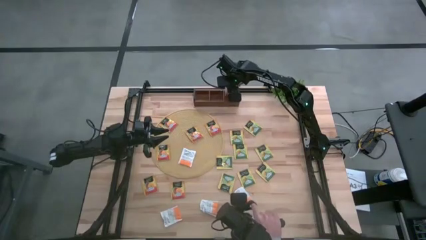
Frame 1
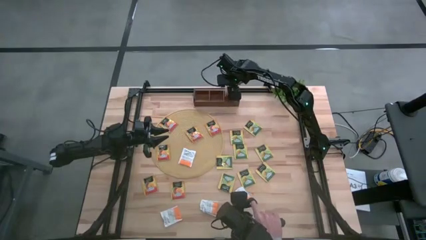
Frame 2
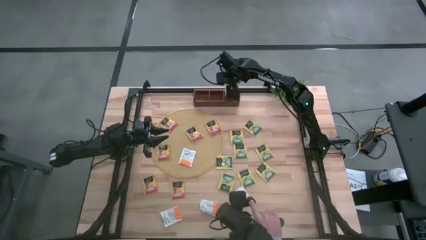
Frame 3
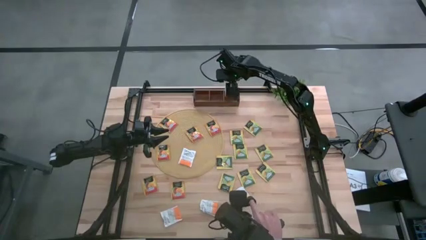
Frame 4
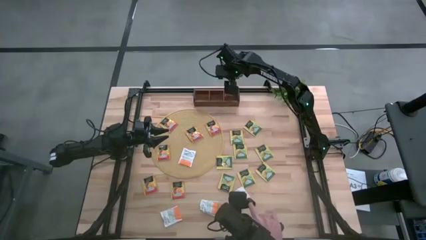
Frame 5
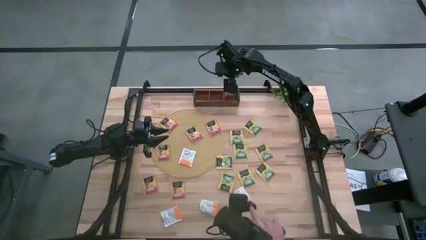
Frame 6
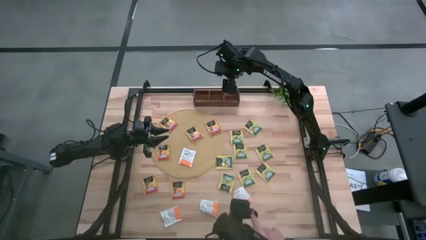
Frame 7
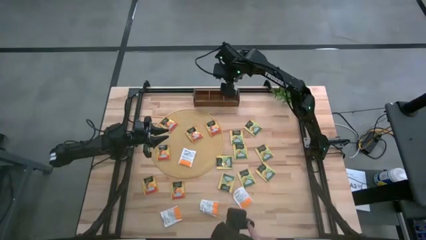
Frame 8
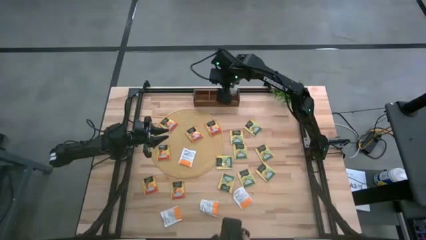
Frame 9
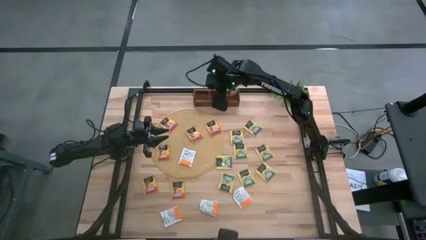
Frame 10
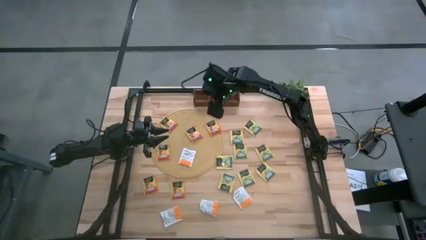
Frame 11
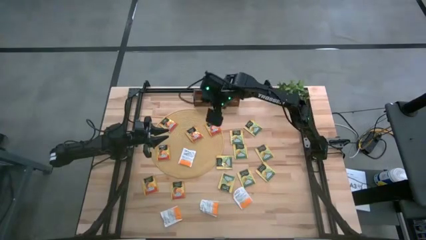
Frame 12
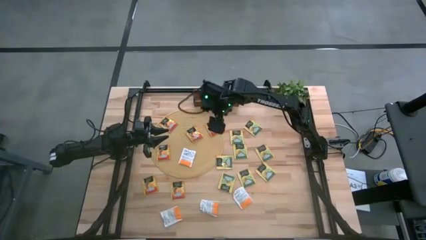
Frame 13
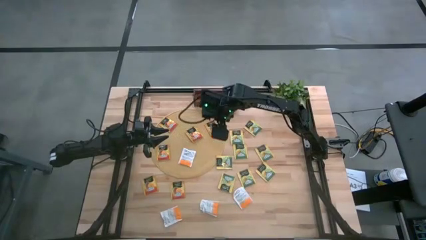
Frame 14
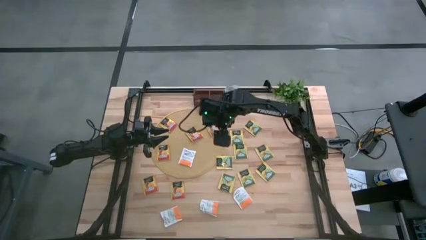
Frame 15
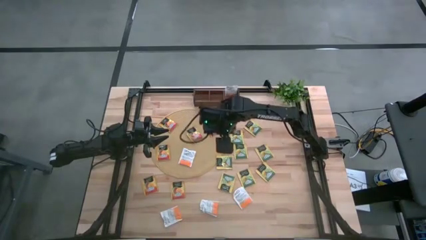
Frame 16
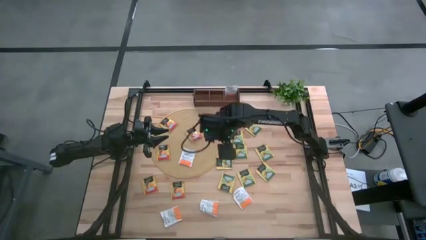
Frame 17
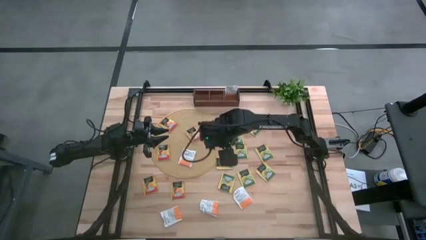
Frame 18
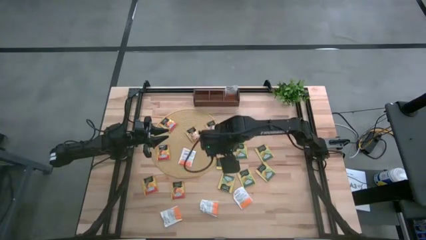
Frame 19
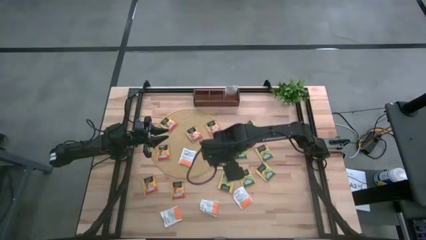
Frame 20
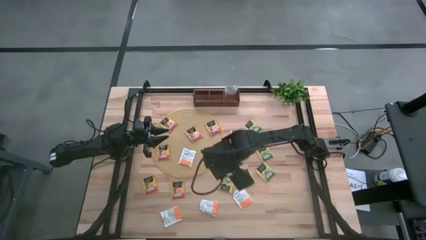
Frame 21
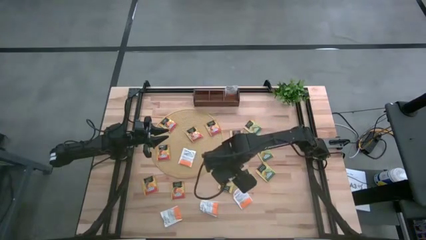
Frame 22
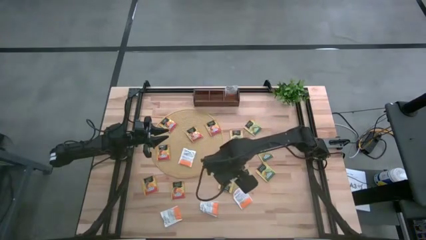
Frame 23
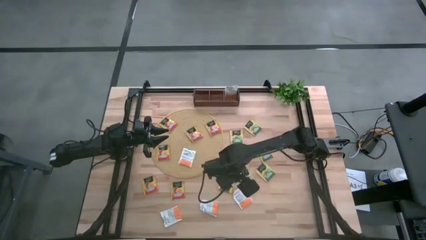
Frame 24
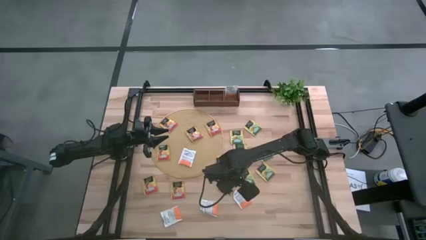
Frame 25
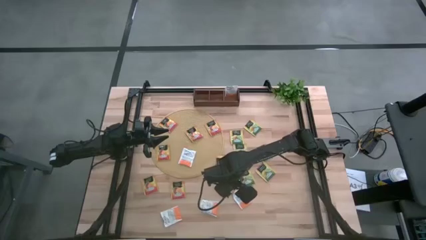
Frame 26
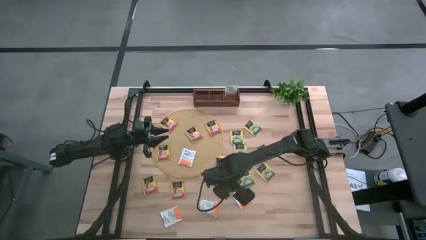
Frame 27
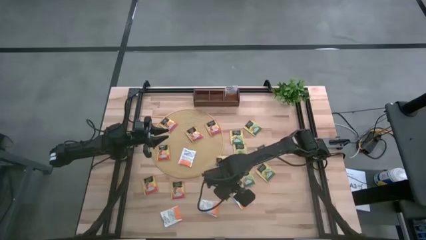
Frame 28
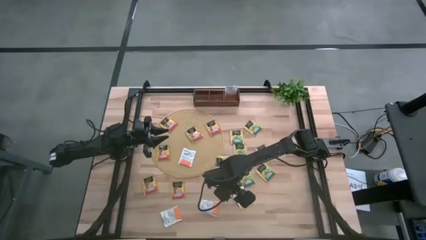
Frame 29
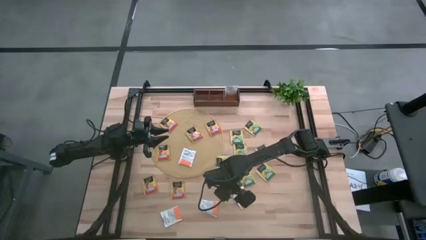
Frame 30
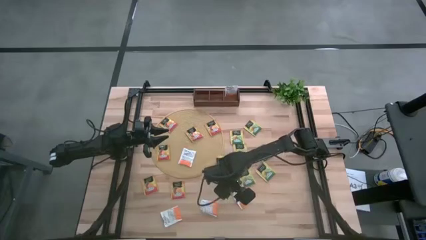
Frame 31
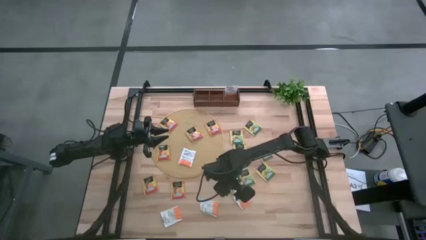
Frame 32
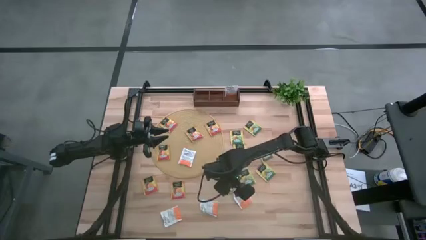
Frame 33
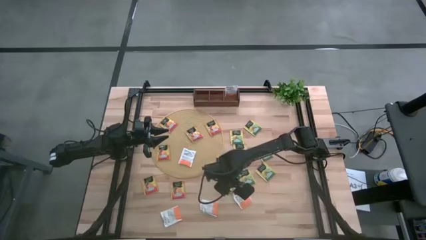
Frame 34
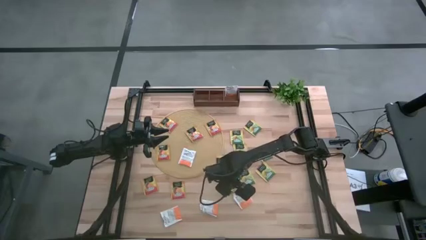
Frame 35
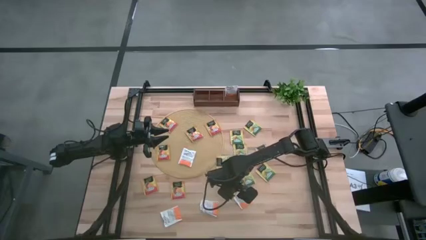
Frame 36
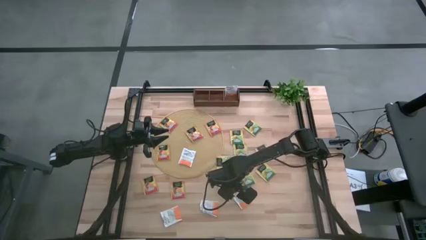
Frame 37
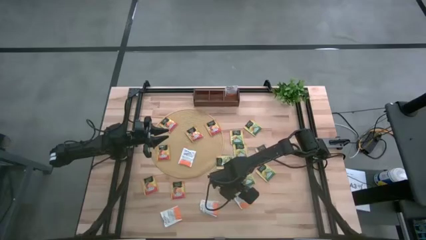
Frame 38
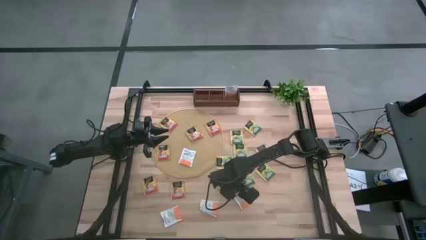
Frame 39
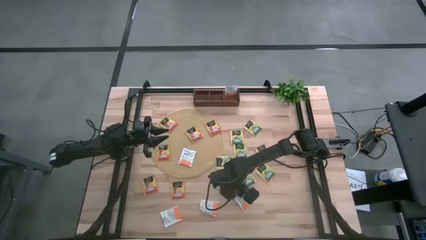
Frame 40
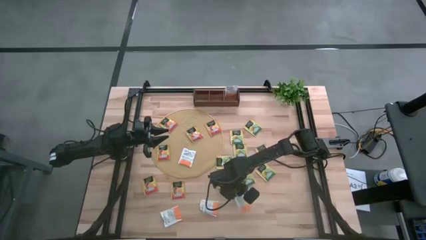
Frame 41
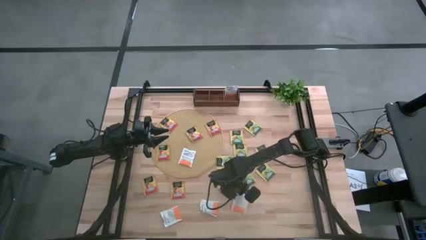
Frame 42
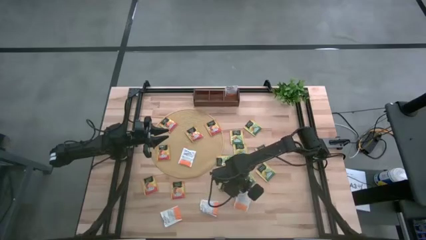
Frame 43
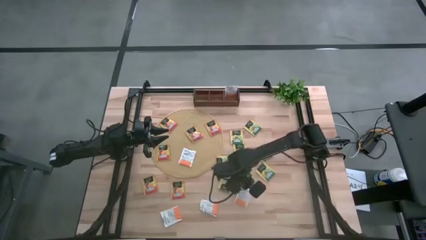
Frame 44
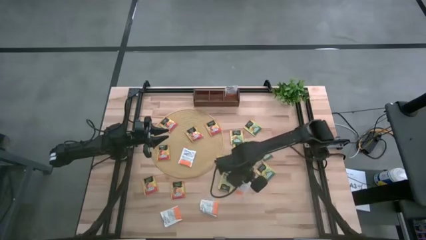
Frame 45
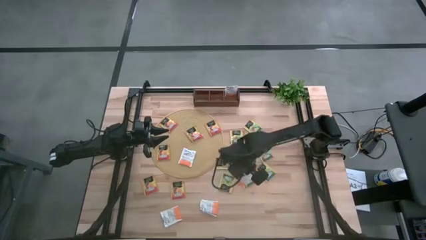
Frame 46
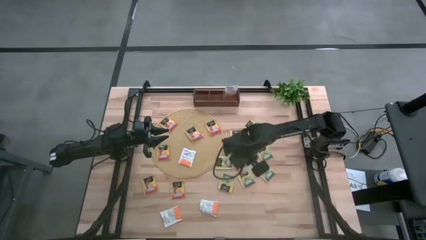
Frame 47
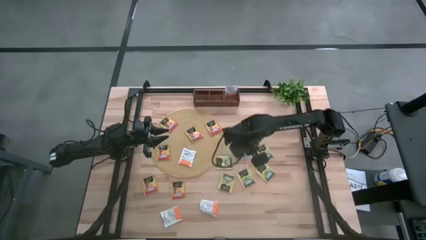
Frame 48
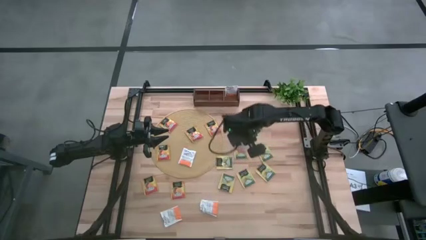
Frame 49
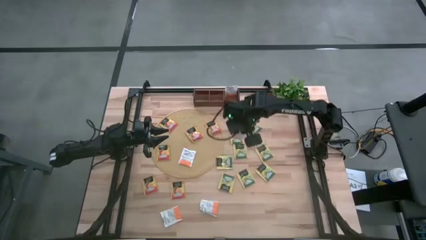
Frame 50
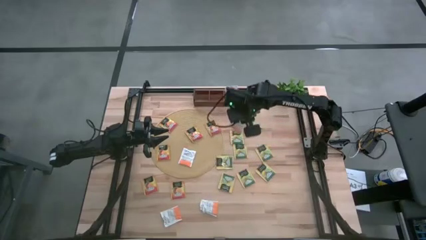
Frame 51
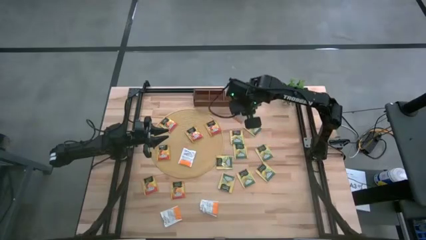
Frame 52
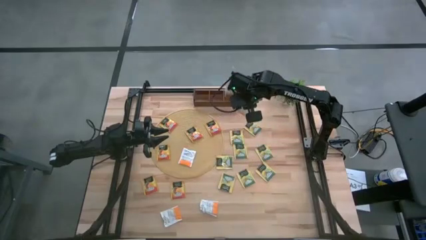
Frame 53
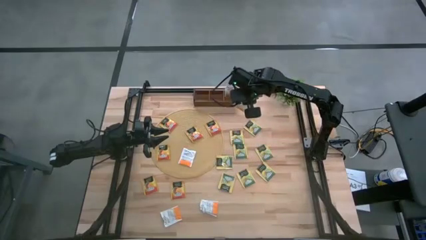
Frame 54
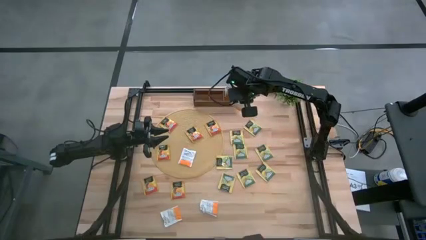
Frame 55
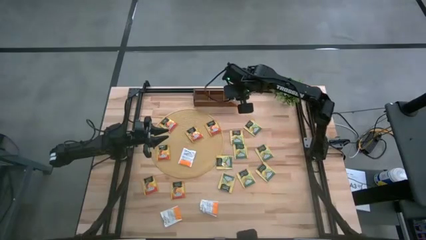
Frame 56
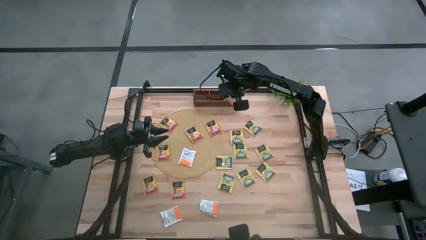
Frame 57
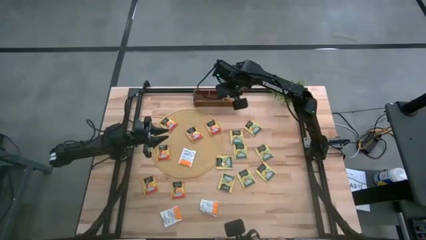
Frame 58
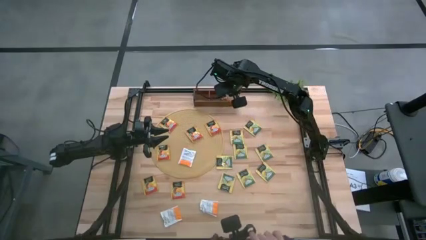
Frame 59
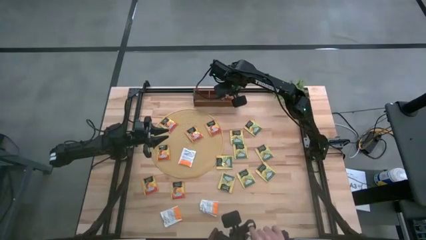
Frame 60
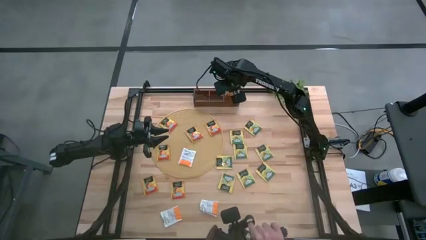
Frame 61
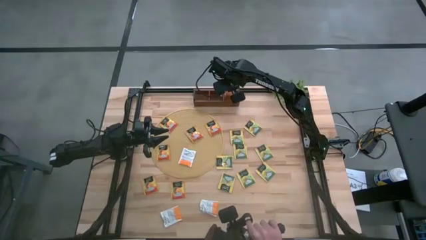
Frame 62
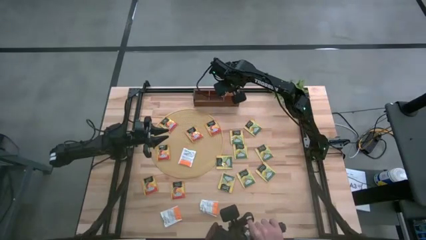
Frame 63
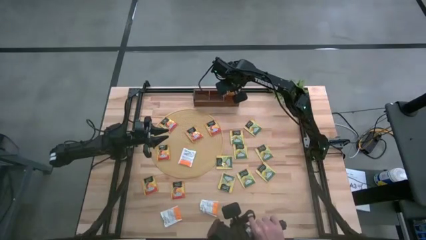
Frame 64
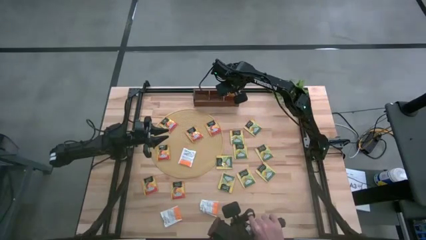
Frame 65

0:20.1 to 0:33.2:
Task: Pick & Place Tea
Put the white tea bag into the right section of the wooden organizer
